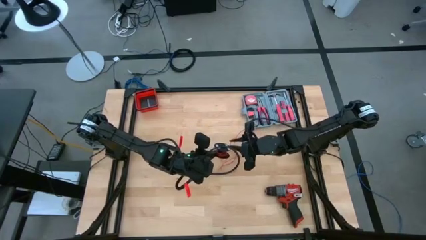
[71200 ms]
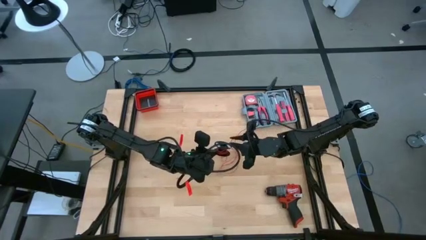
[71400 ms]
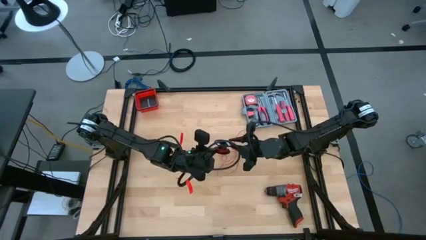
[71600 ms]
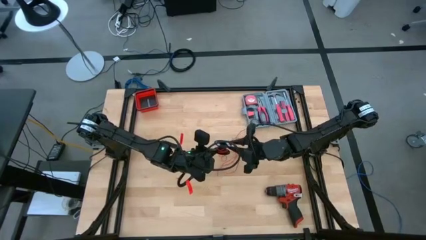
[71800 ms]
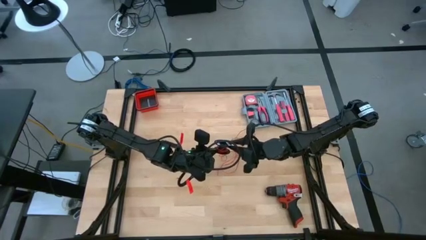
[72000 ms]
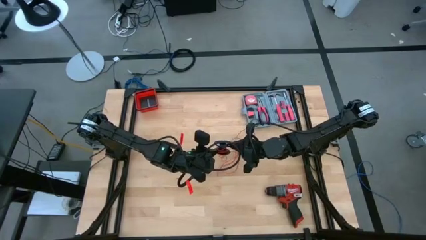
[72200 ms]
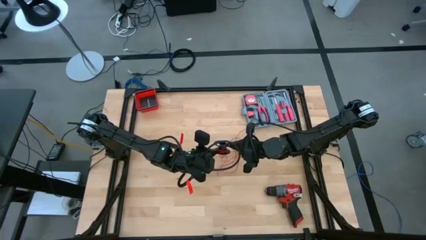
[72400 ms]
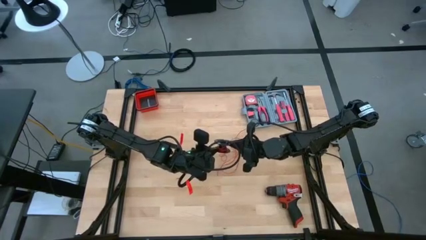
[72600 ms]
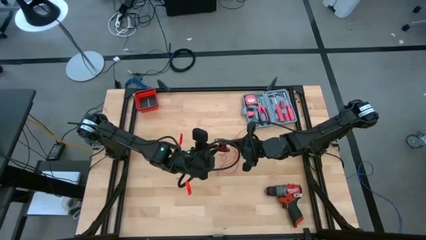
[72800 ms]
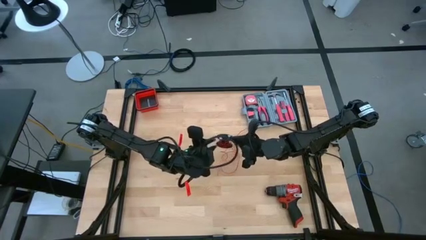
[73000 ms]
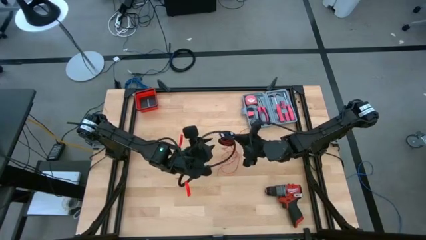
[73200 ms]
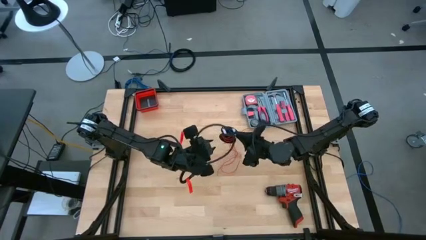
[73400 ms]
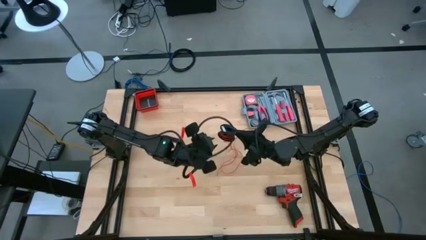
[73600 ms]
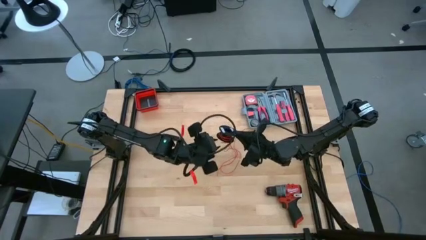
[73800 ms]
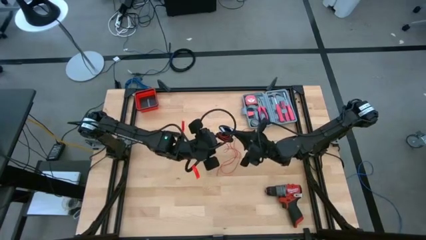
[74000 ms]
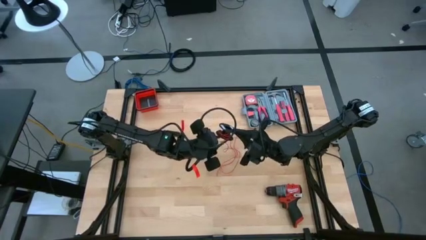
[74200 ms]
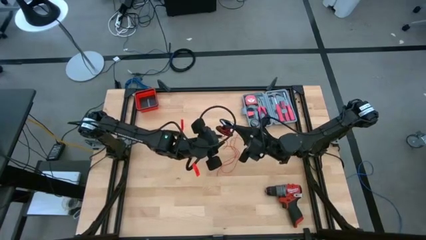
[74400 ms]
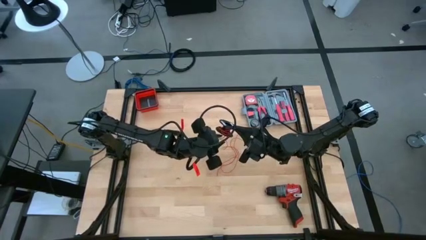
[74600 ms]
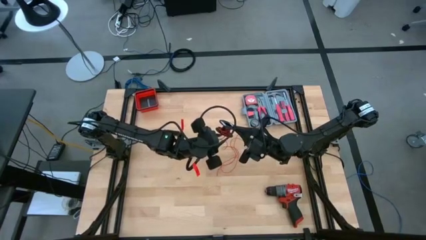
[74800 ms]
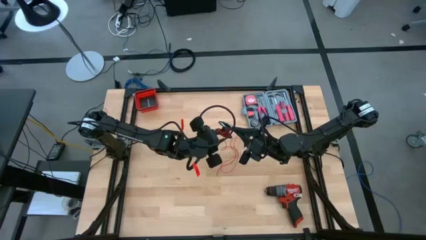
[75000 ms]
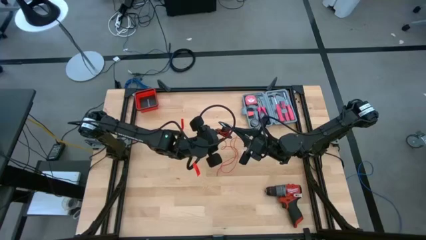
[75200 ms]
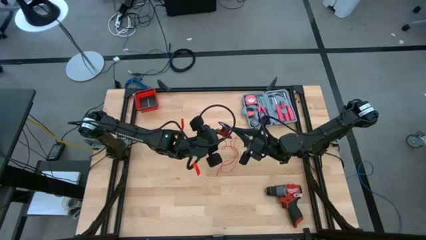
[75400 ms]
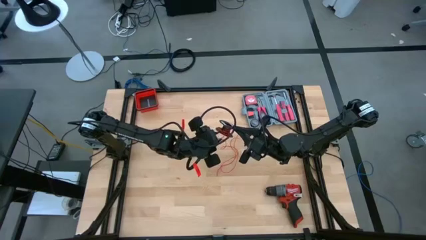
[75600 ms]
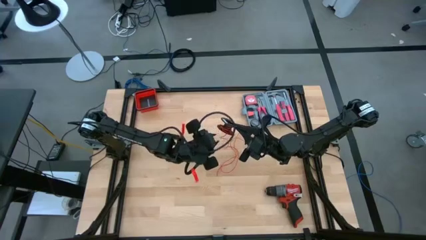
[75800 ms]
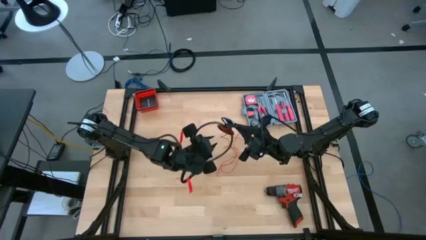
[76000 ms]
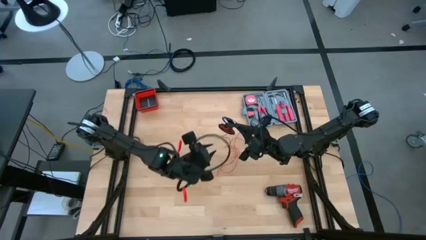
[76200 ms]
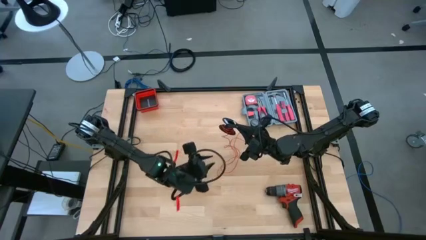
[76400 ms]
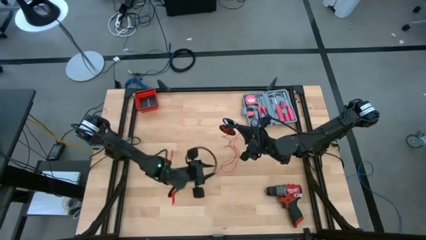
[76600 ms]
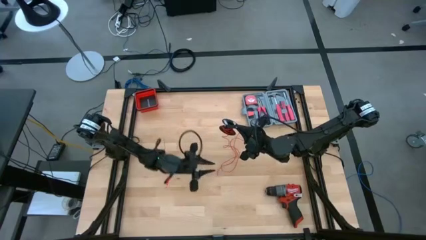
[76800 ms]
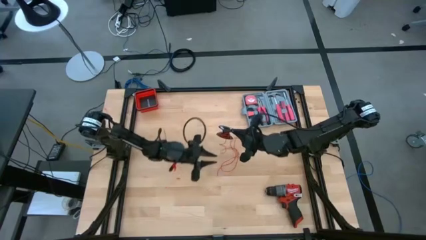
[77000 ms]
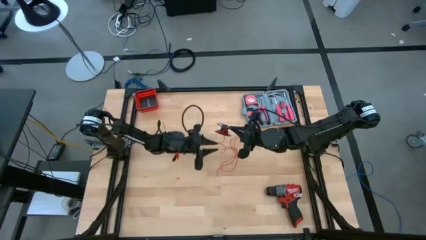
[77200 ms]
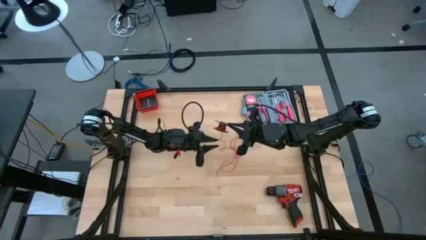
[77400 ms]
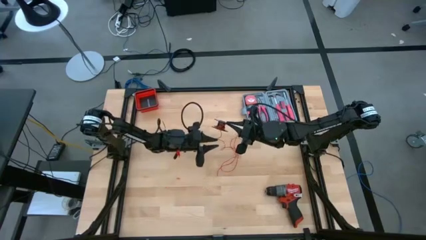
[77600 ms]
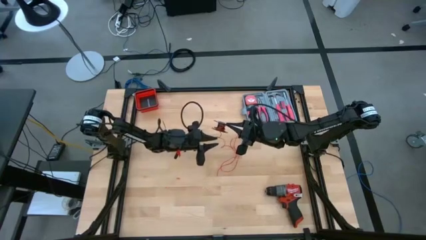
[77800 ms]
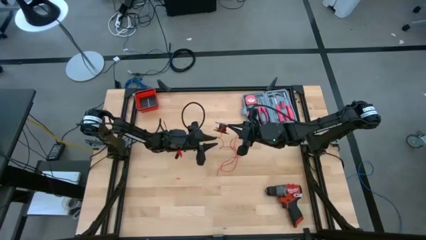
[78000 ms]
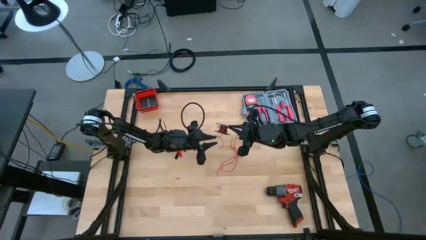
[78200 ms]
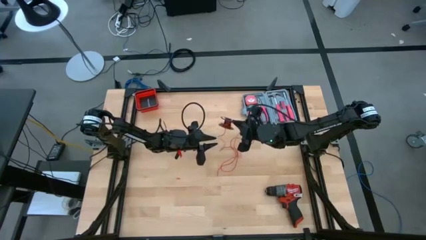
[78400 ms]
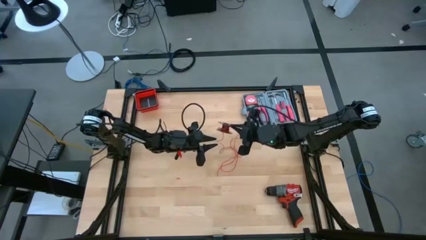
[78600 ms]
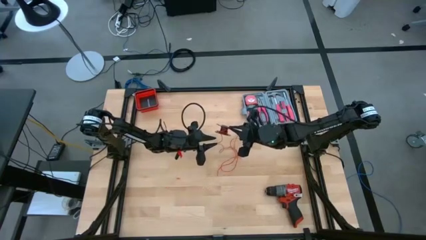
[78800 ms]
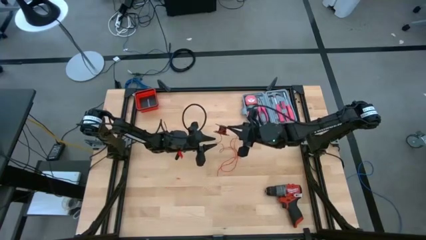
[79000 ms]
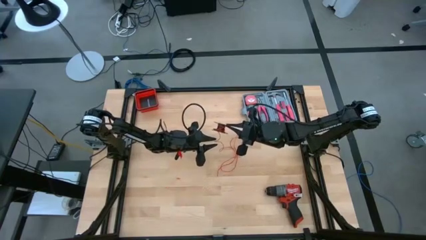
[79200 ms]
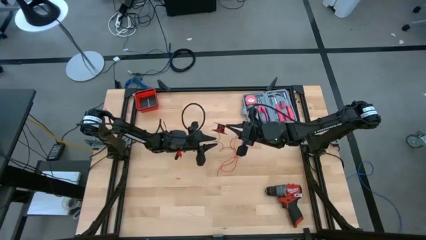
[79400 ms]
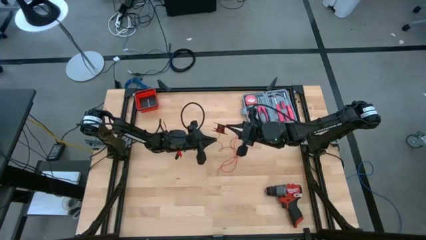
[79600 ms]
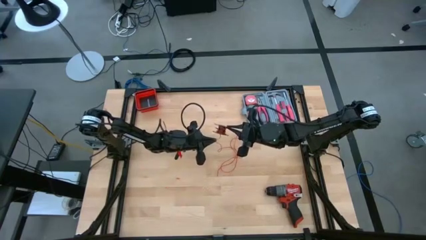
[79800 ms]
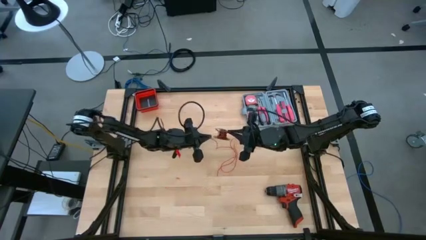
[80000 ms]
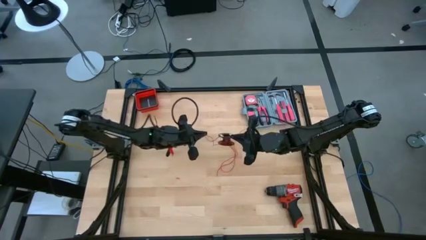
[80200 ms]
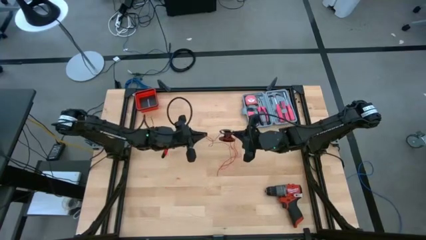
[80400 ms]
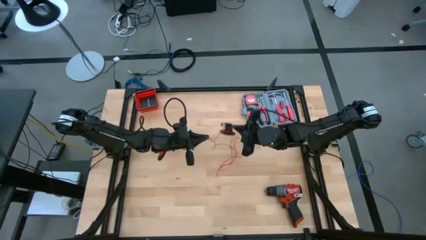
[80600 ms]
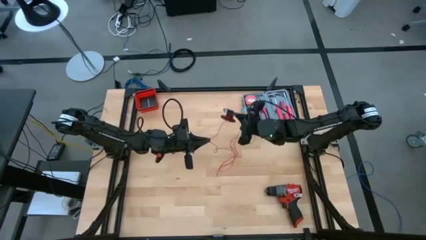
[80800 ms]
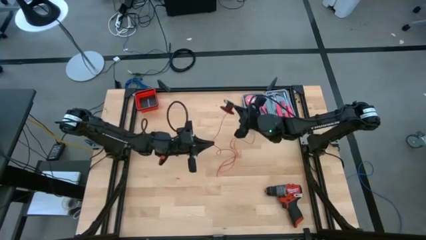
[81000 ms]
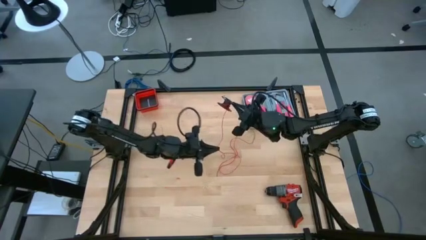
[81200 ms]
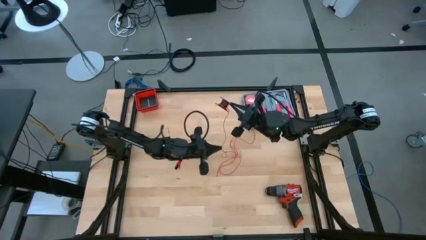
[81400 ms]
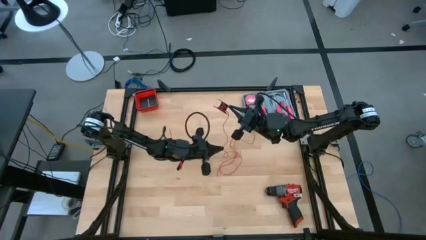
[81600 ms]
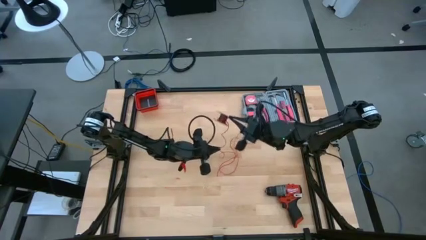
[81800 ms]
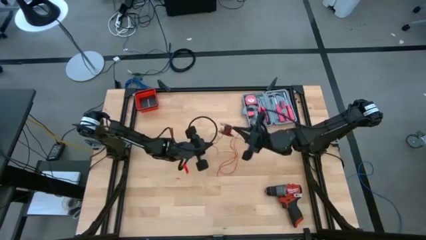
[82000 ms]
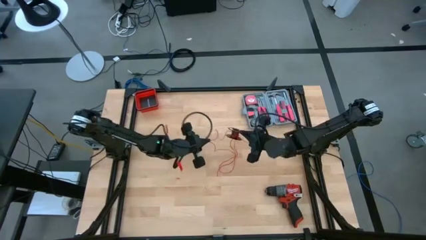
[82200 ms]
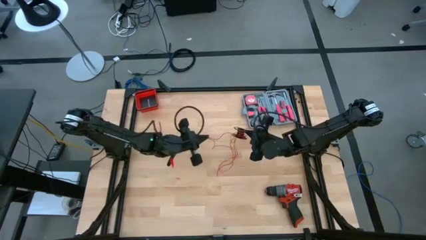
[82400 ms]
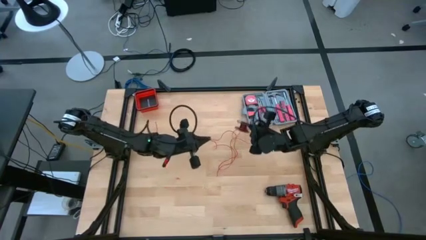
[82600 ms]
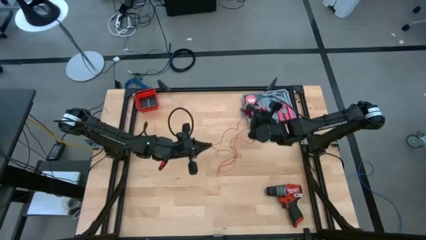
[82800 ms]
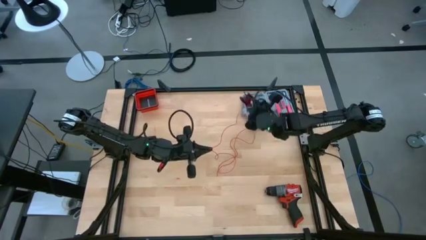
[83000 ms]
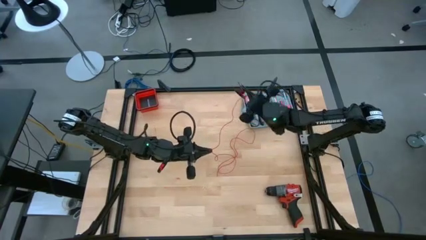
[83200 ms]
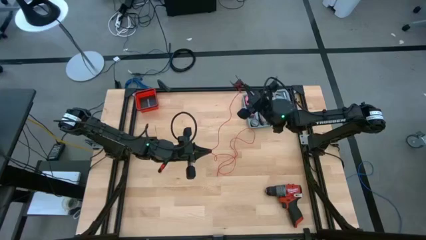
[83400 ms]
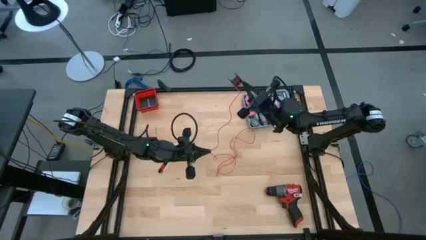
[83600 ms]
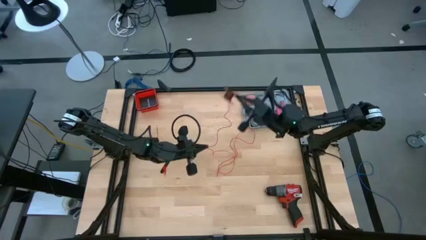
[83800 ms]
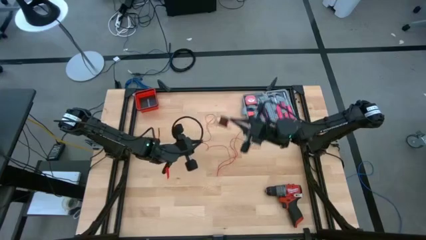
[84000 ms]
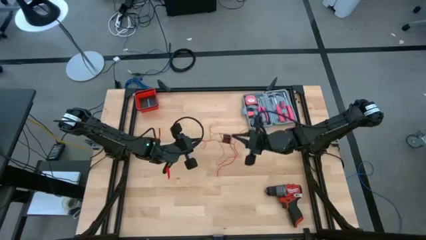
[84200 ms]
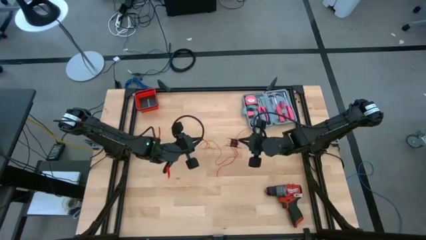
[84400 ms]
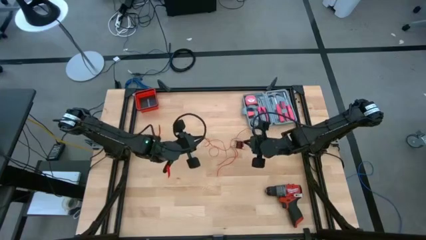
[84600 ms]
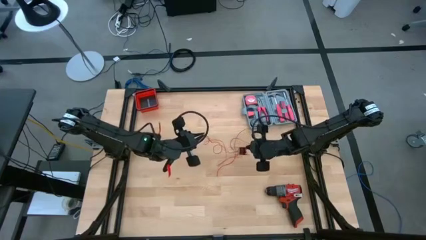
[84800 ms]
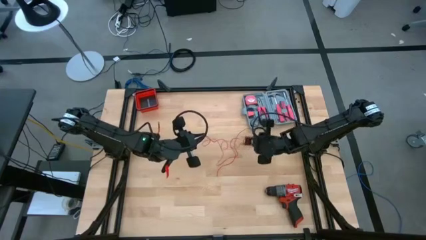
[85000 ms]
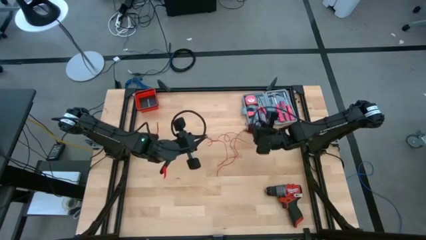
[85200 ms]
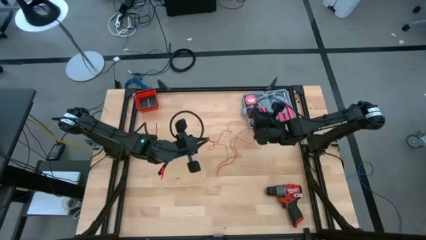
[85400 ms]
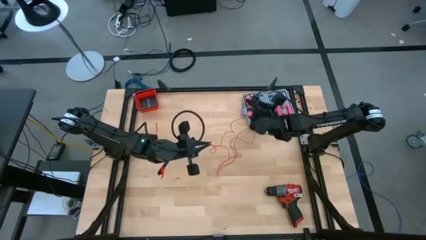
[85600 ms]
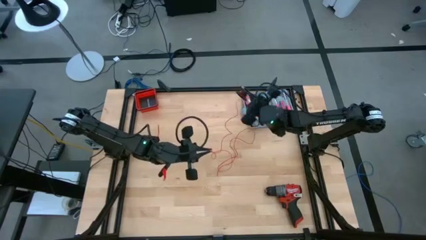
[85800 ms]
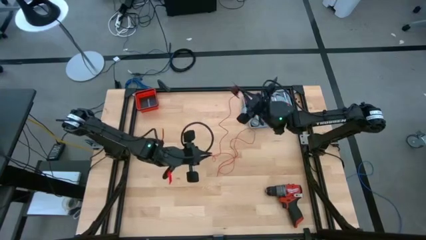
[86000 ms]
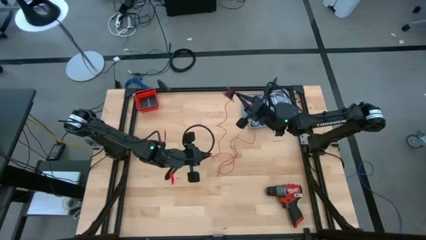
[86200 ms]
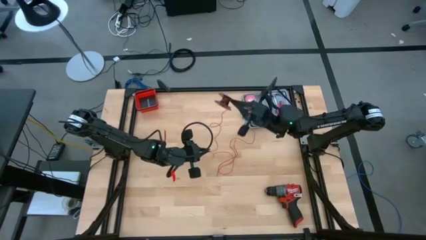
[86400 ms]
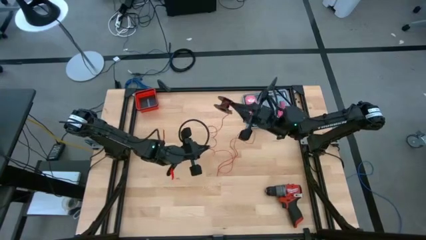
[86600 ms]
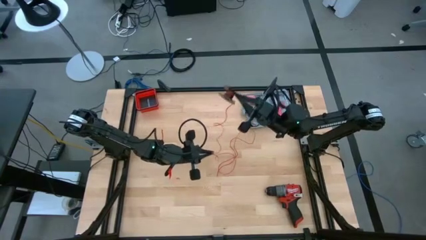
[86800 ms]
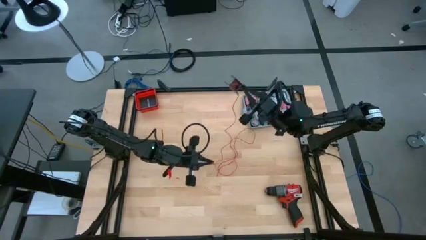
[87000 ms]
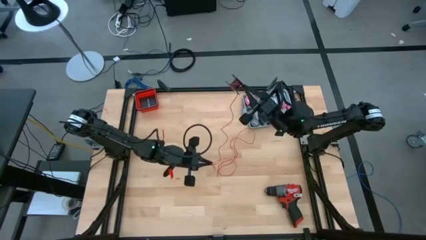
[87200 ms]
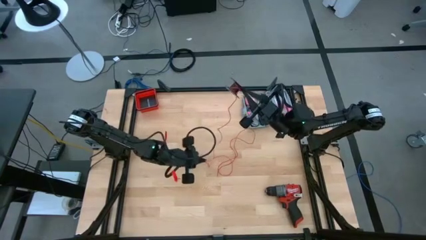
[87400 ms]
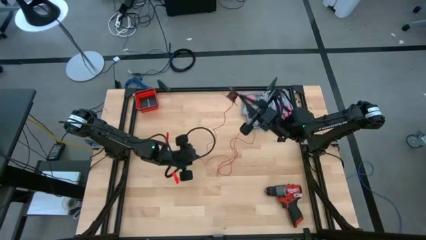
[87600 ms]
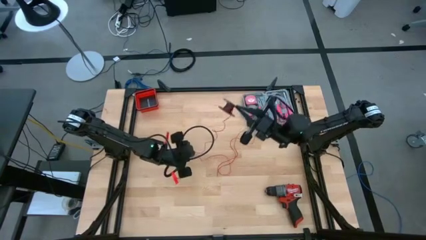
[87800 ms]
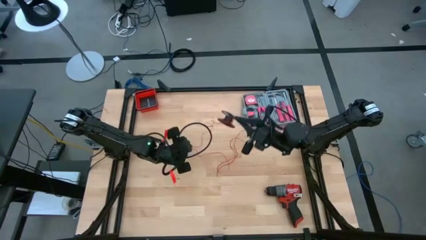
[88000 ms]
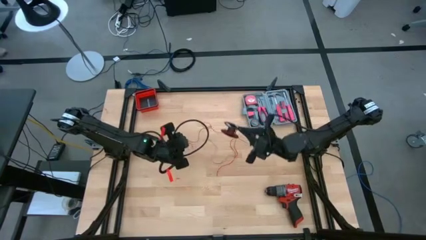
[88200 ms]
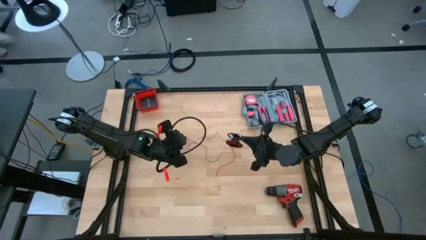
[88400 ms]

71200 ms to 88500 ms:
Task: Coil cords
Uncoil the red wire from the black spool
